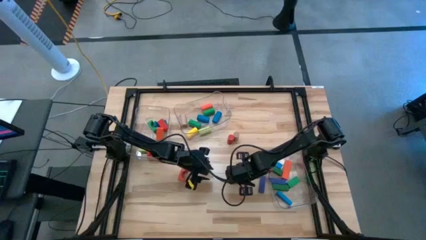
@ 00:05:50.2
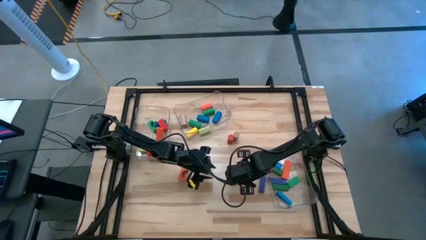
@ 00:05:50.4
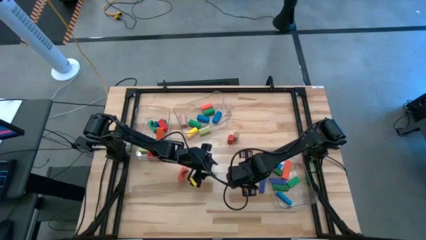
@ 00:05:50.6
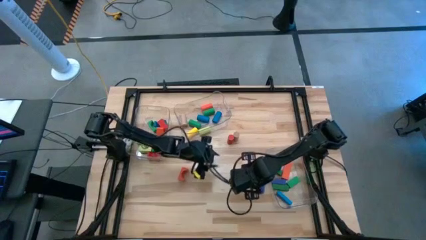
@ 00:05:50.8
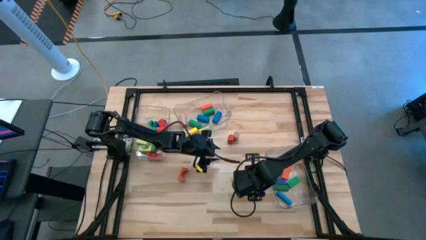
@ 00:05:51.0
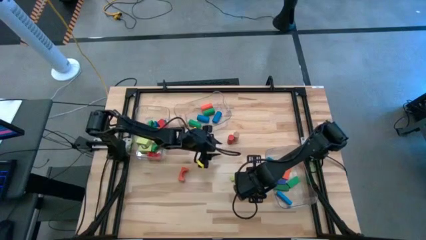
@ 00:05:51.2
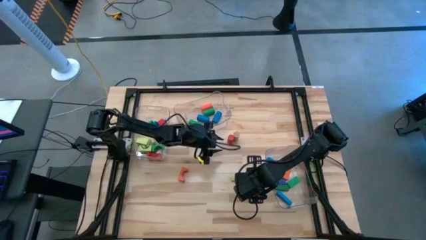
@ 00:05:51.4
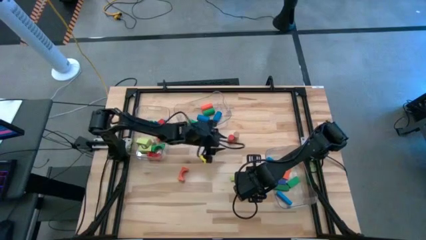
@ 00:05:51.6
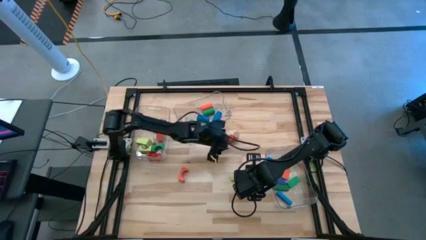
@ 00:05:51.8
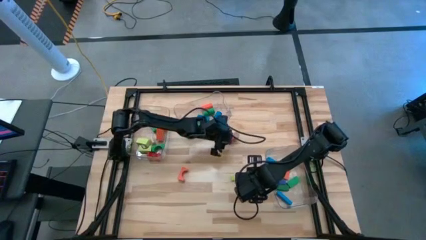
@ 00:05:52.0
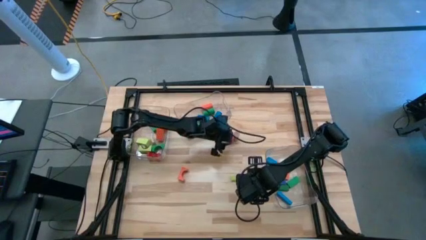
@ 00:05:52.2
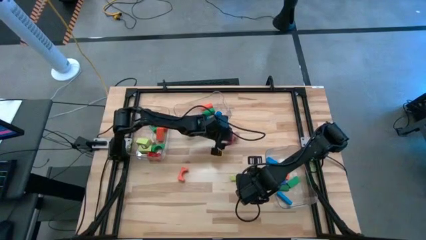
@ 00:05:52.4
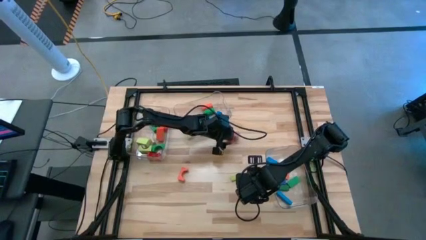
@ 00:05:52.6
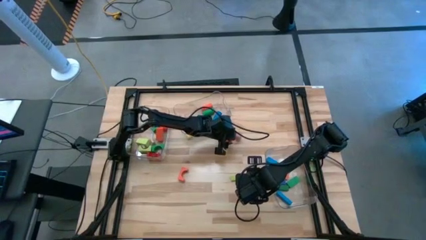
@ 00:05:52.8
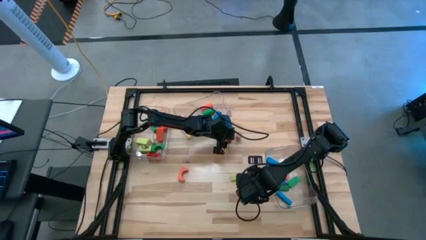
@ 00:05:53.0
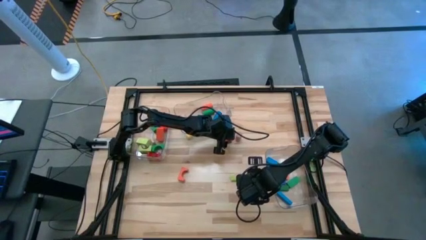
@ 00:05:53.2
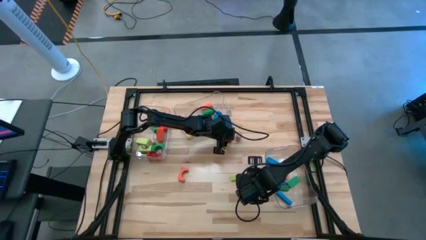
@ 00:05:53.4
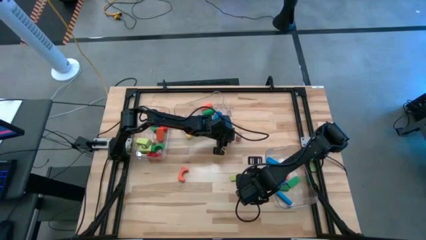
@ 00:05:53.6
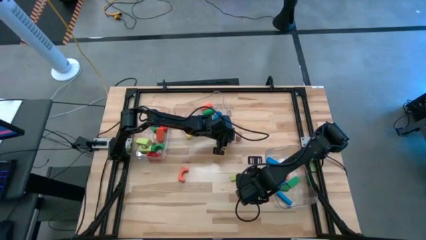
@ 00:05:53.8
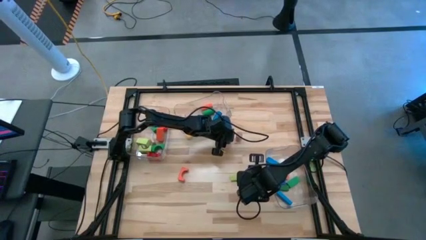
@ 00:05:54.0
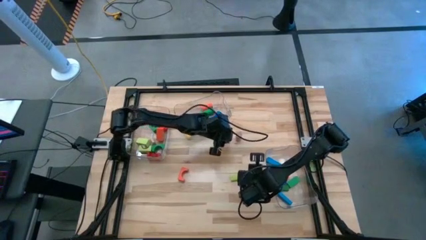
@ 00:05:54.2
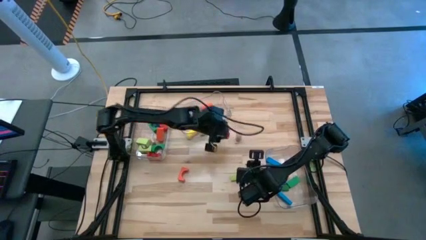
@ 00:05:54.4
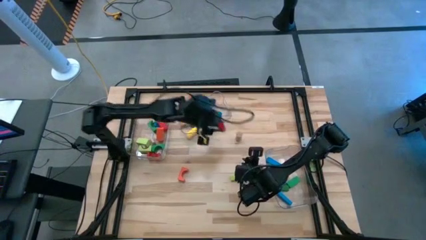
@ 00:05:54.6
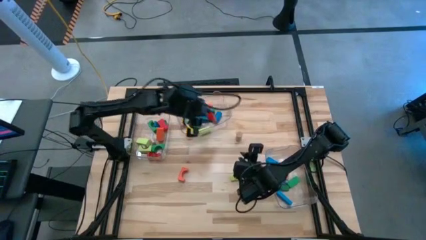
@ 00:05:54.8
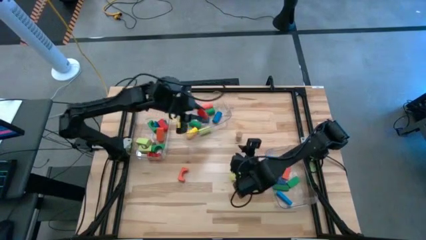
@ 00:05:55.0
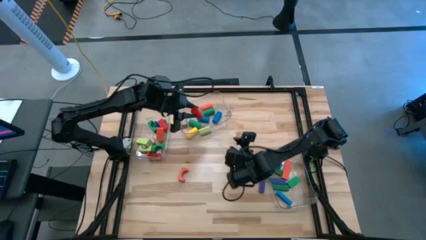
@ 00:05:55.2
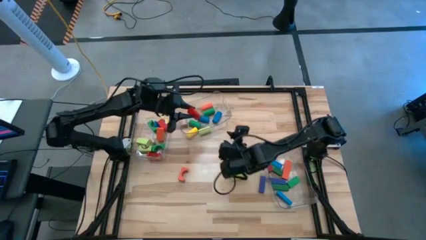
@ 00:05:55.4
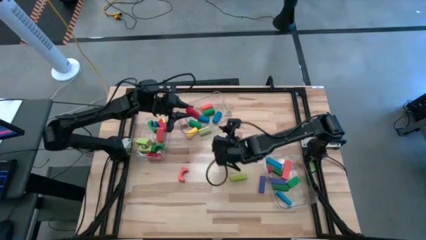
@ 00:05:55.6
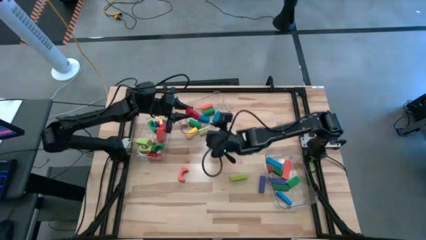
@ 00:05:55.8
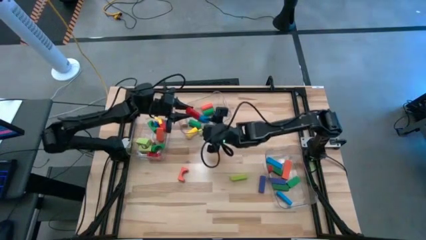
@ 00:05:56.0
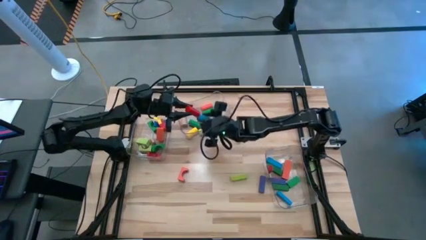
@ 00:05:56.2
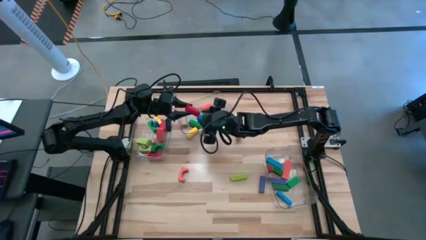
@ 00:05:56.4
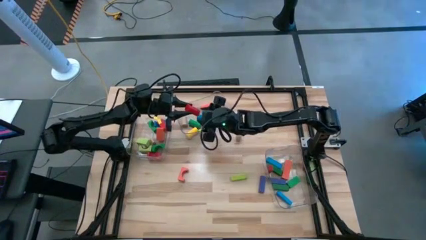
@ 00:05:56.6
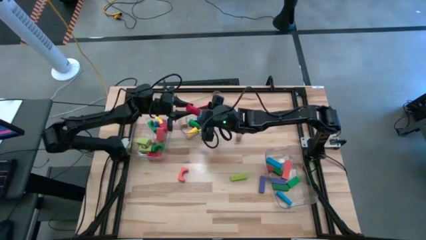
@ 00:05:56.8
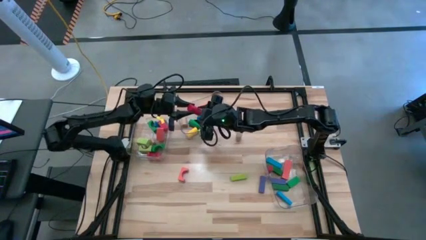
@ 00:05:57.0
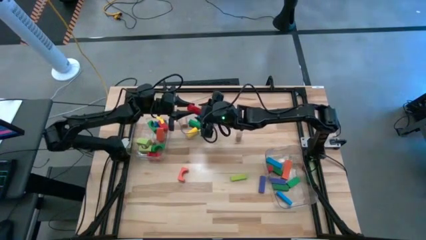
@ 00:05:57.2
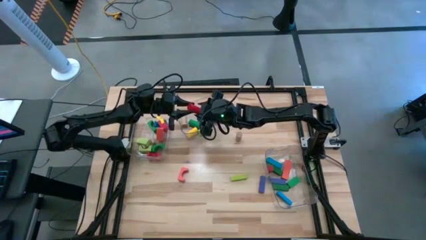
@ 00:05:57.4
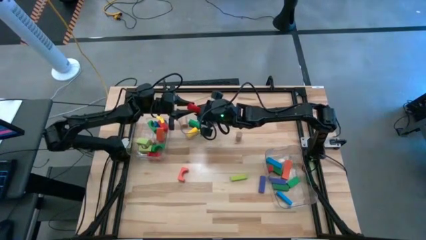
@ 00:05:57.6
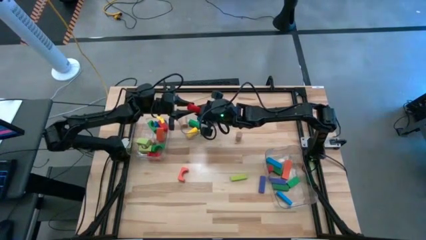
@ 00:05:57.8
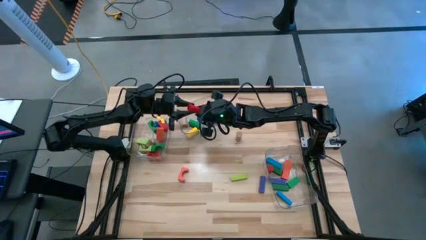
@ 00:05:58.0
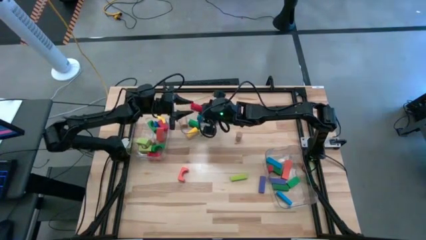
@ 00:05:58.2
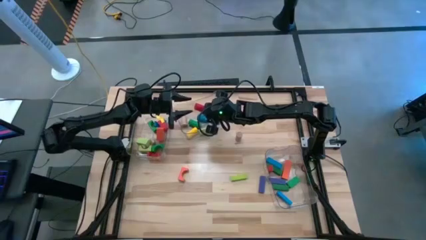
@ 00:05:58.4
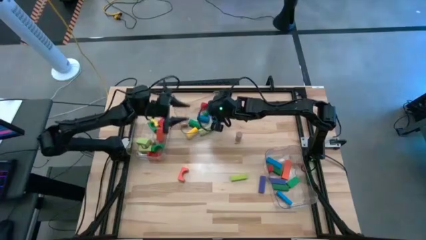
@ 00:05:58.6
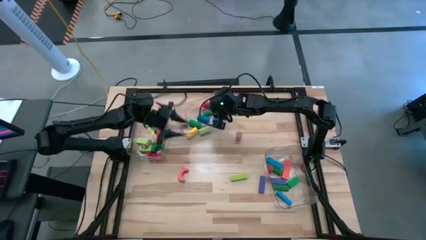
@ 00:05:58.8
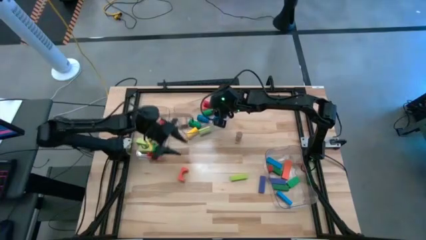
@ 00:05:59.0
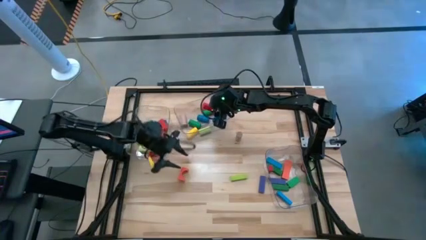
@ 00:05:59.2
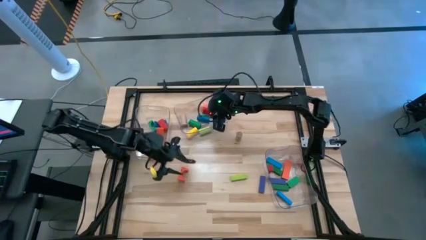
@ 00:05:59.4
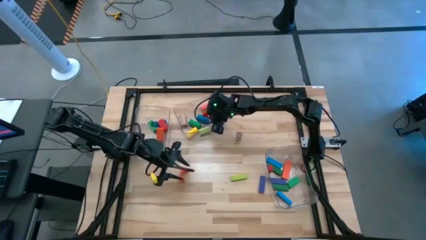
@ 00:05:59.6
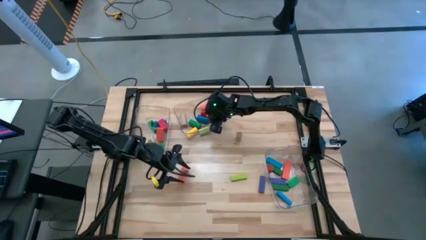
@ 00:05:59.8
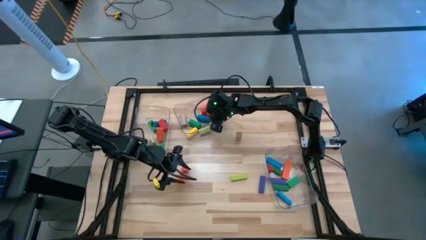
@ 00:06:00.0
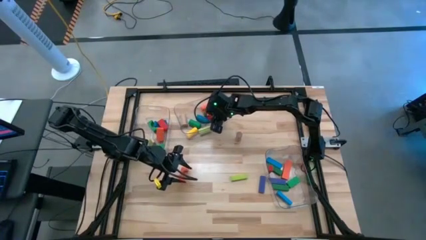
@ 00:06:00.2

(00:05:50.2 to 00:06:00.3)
Task: Sort blocks by size
Put the red cylindrical block into the top transparent bin

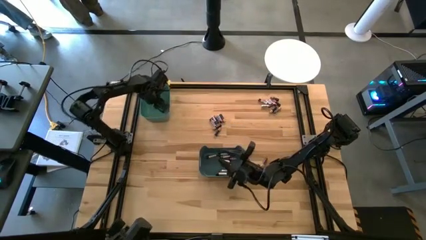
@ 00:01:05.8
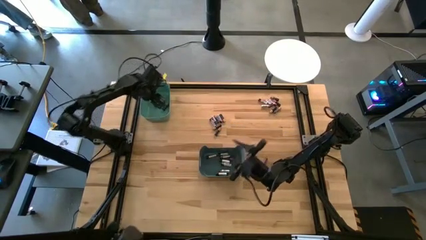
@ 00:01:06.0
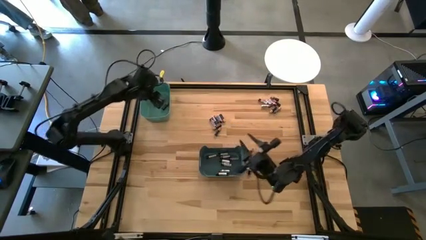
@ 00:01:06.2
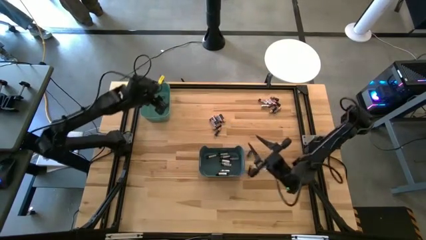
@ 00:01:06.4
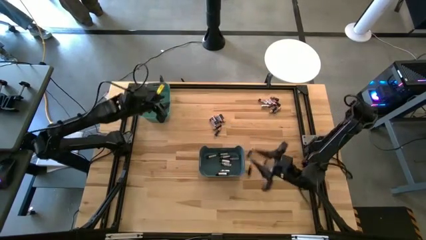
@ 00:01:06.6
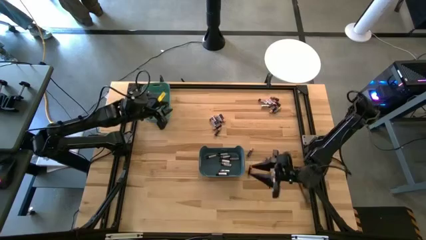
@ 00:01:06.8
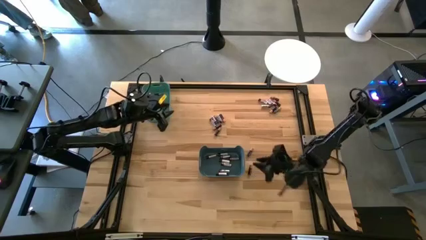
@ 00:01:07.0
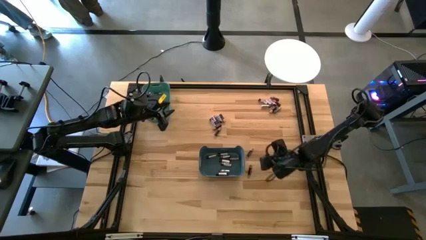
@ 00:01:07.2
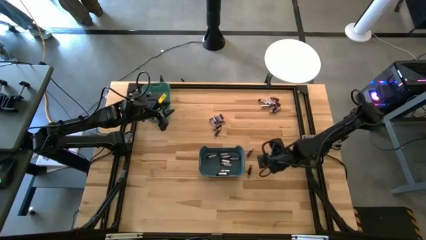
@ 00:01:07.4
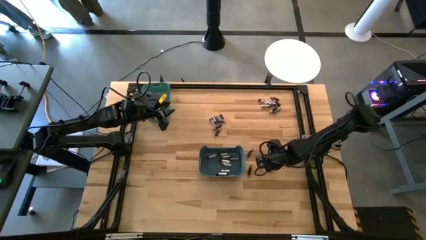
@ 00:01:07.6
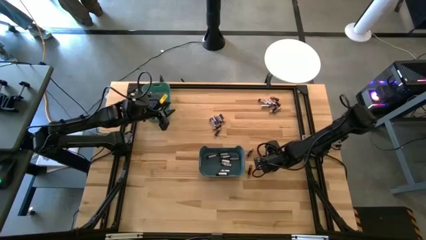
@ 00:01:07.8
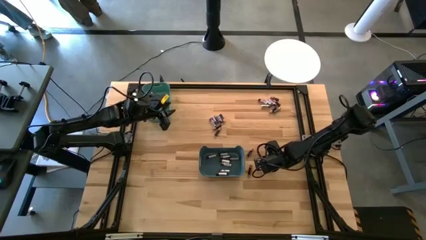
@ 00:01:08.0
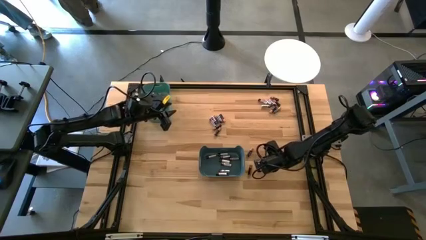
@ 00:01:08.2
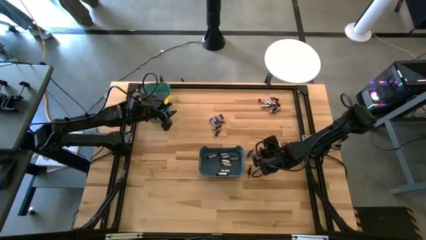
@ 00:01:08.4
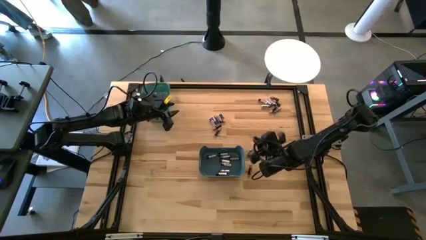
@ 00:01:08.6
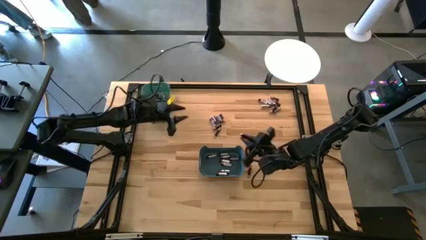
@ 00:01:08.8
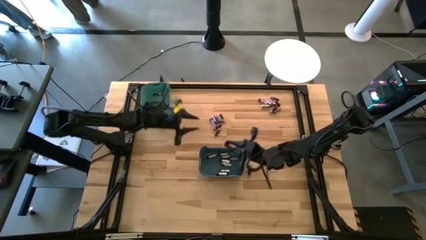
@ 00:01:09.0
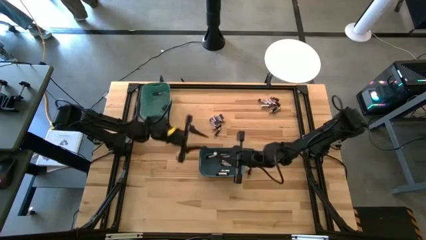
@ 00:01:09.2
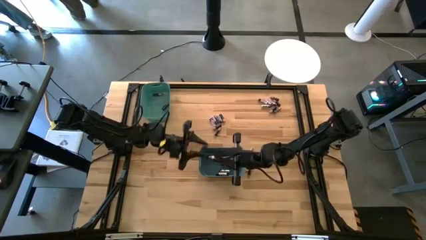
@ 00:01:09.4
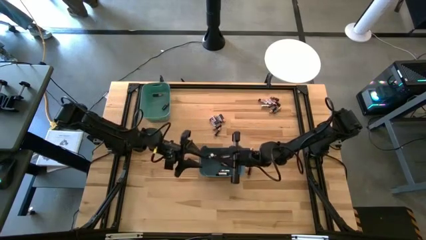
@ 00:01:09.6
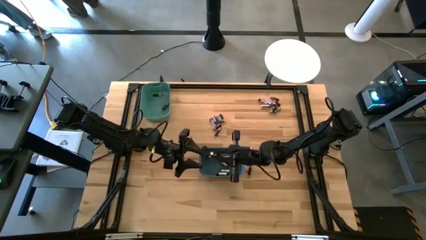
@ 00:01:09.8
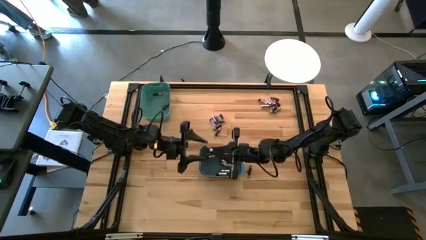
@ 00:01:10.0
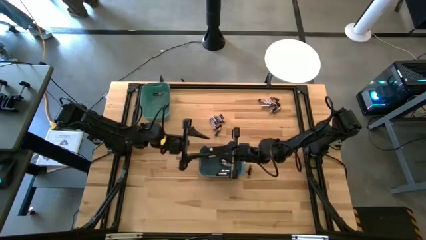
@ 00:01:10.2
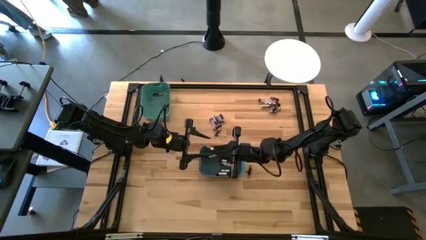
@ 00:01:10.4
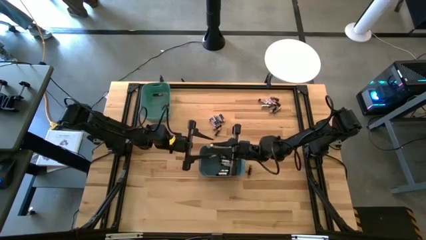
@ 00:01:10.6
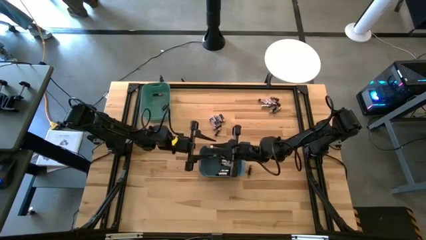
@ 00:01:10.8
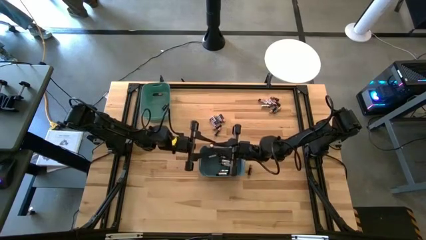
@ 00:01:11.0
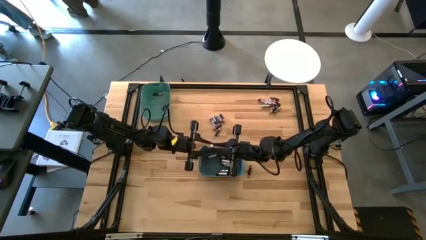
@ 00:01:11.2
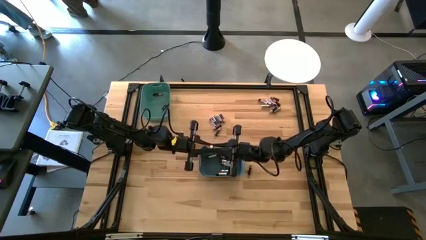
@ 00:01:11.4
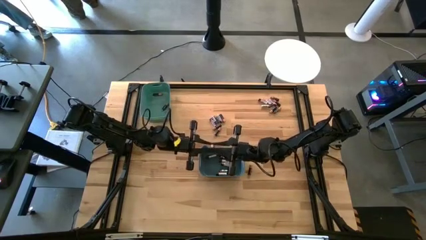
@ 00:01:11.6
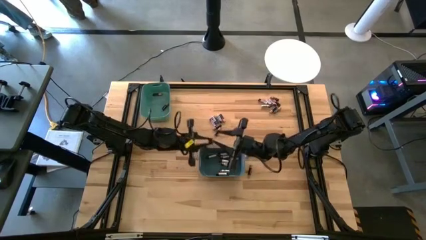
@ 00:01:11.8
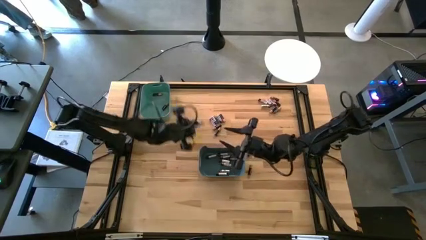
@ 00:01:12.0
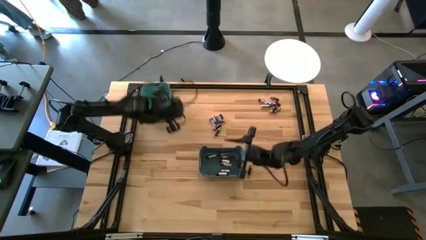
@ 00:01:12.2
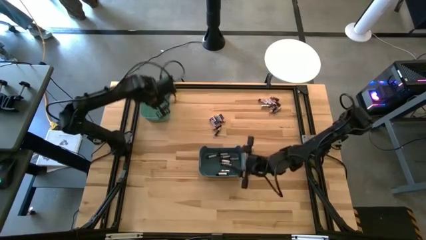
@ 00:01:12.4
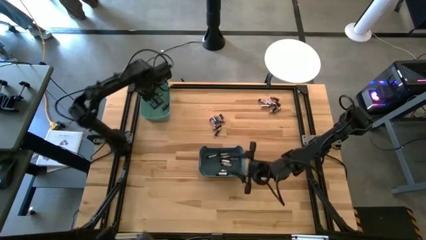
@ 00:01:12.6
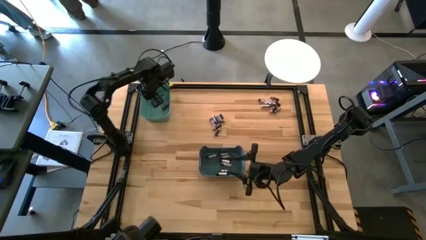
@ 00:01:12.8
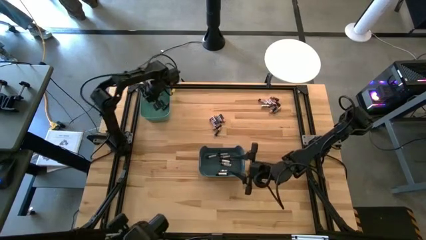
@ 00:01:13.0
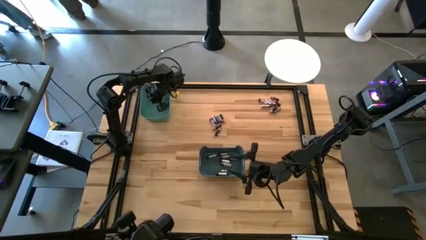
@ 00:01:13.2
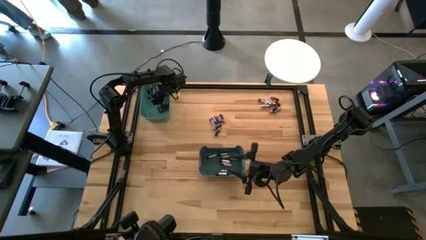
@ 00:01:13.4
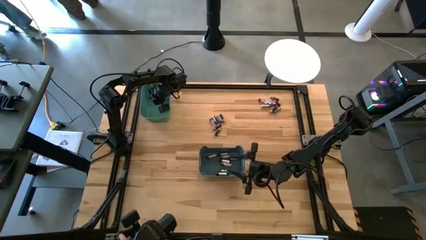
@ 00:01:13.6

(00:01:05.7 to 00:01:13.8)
Task: Sort batteries
Put the black battery into the green bin
